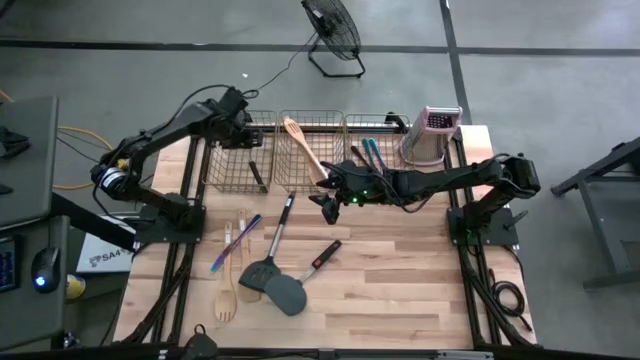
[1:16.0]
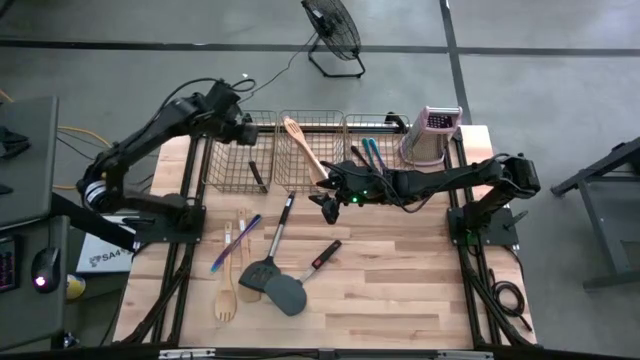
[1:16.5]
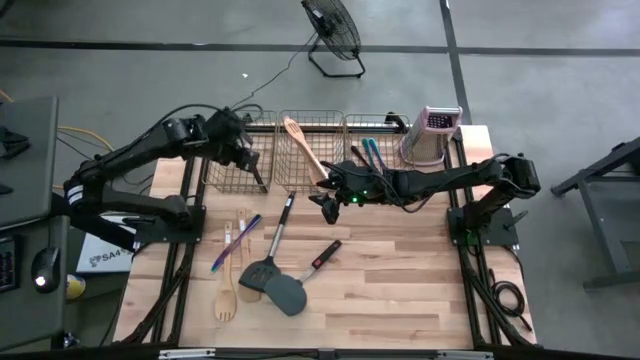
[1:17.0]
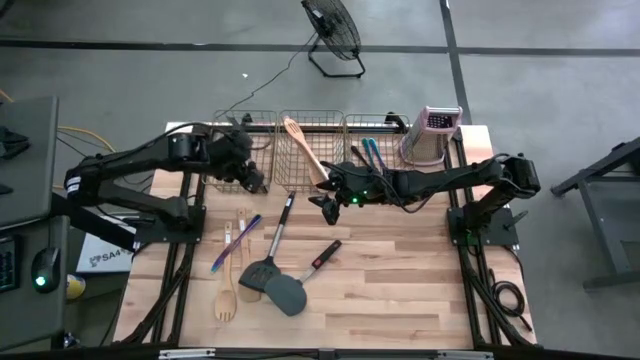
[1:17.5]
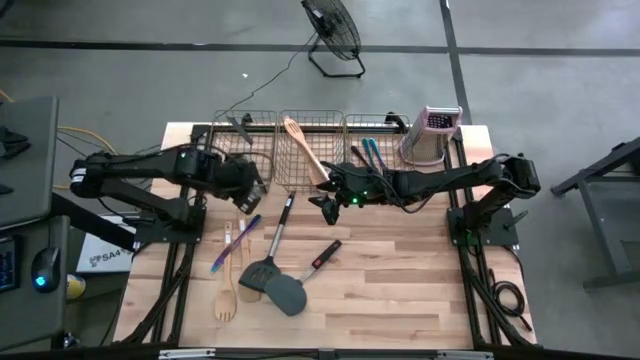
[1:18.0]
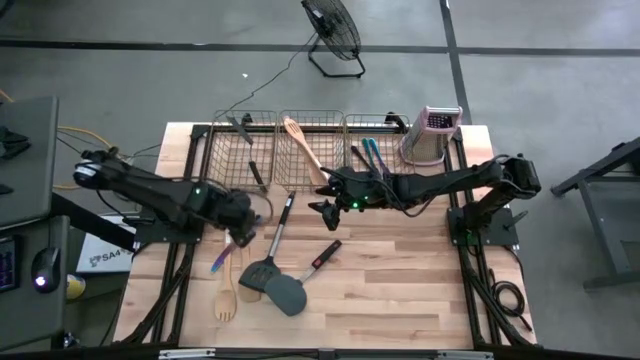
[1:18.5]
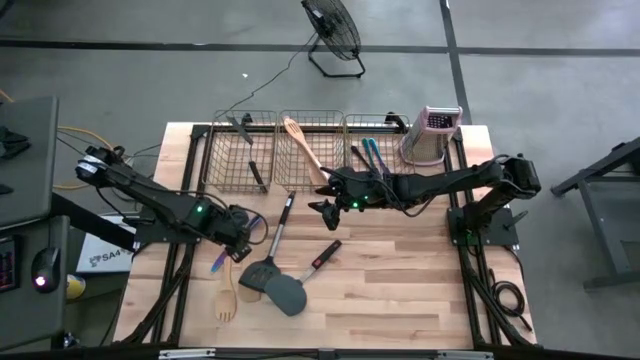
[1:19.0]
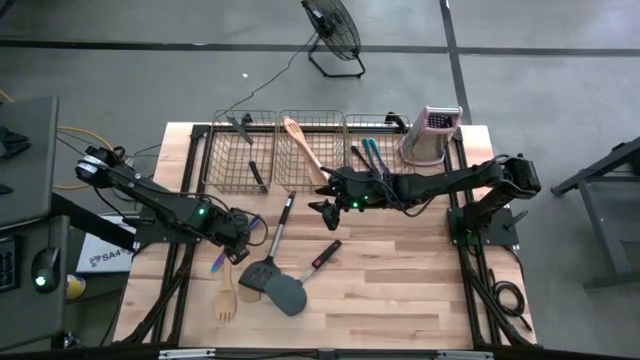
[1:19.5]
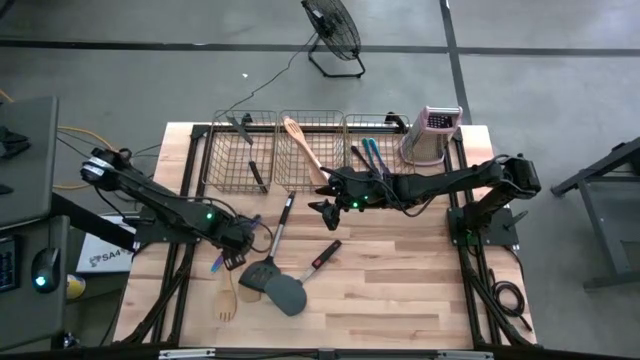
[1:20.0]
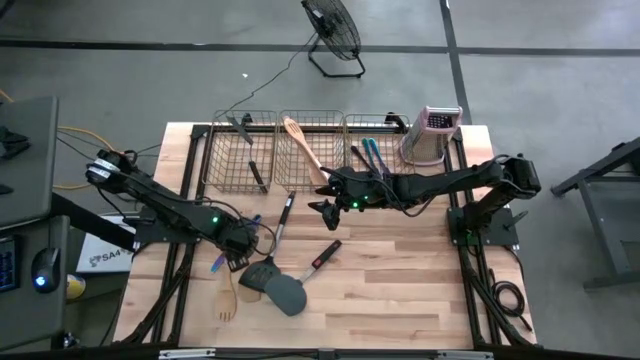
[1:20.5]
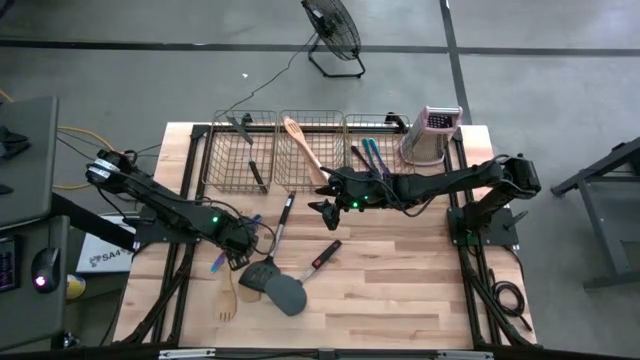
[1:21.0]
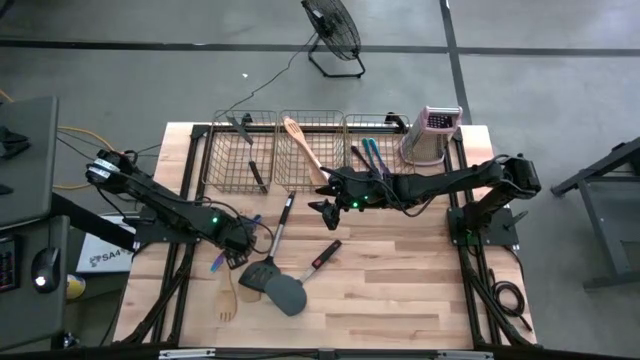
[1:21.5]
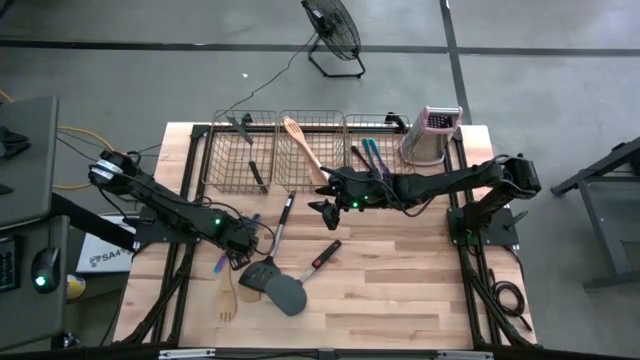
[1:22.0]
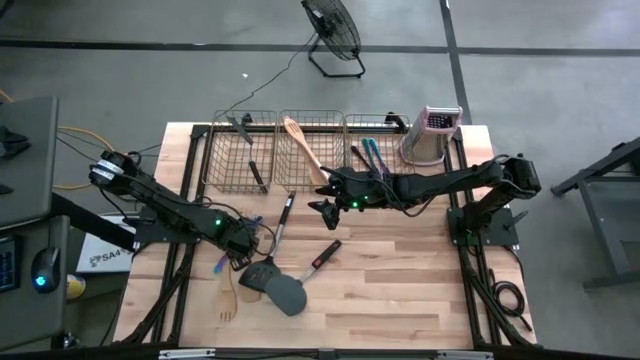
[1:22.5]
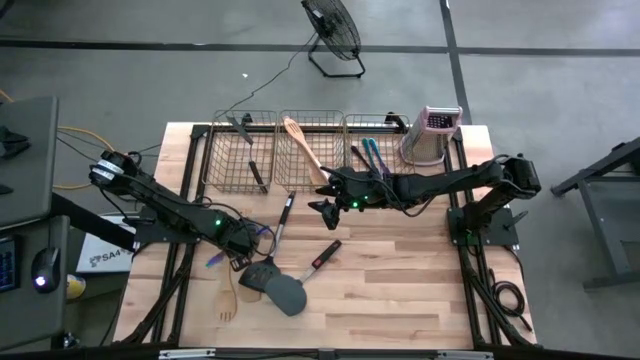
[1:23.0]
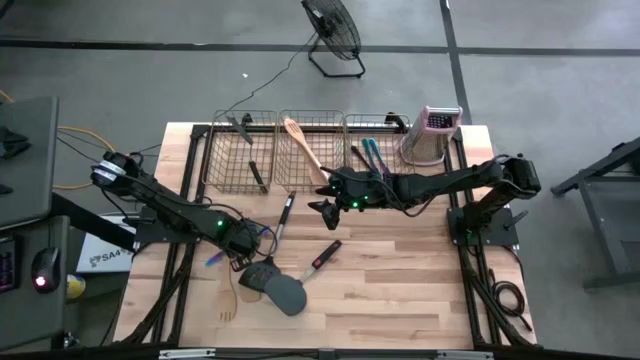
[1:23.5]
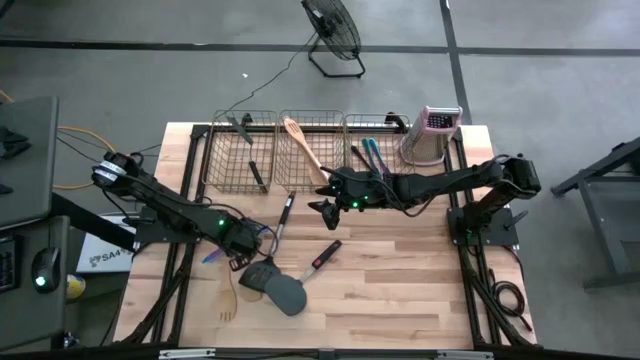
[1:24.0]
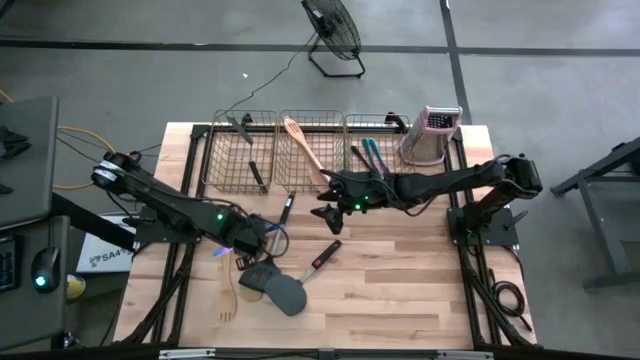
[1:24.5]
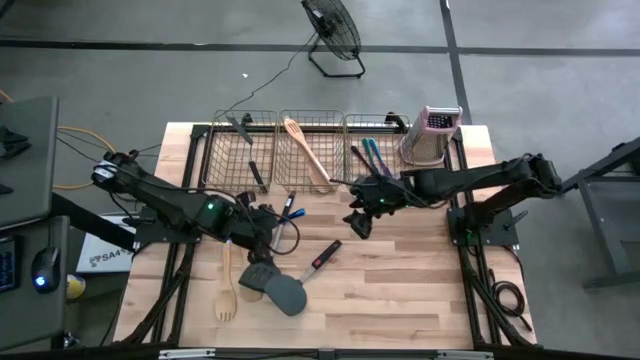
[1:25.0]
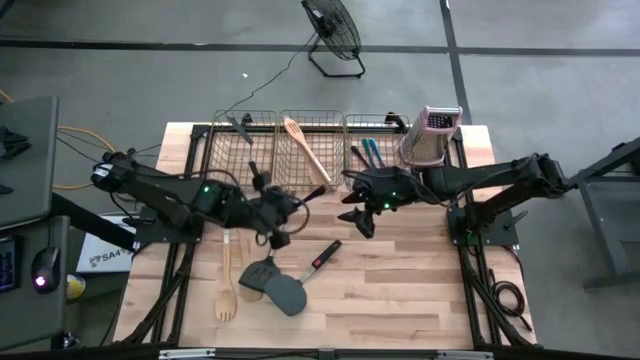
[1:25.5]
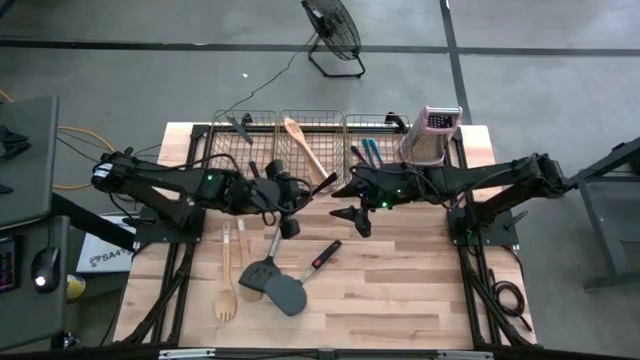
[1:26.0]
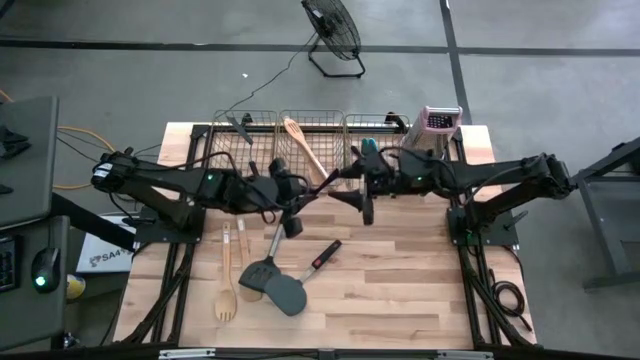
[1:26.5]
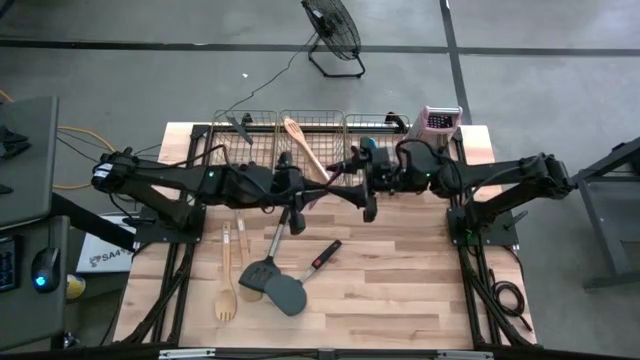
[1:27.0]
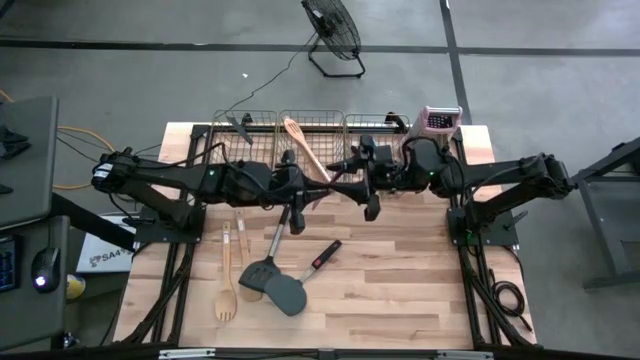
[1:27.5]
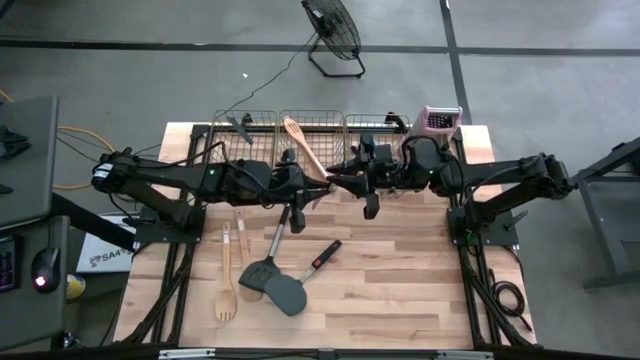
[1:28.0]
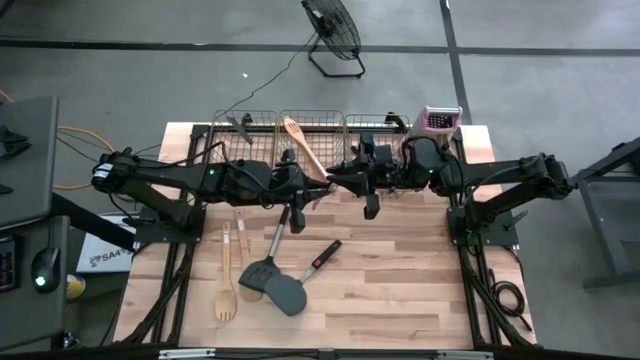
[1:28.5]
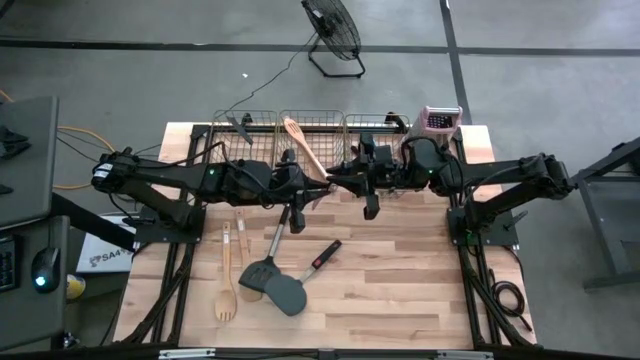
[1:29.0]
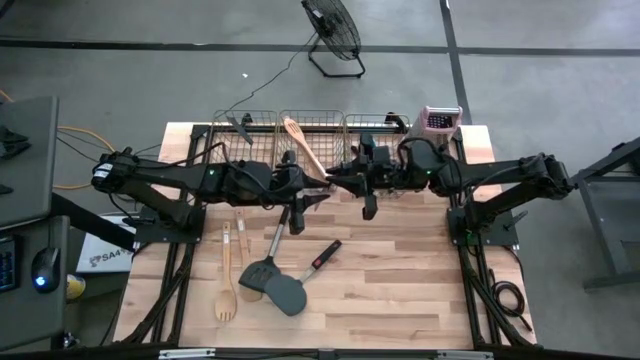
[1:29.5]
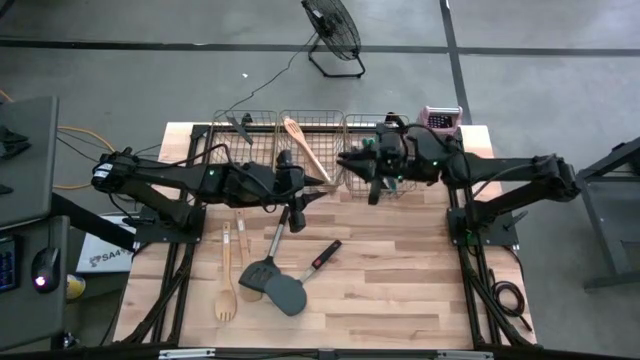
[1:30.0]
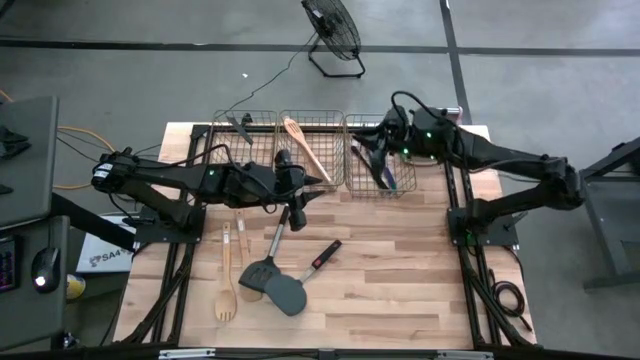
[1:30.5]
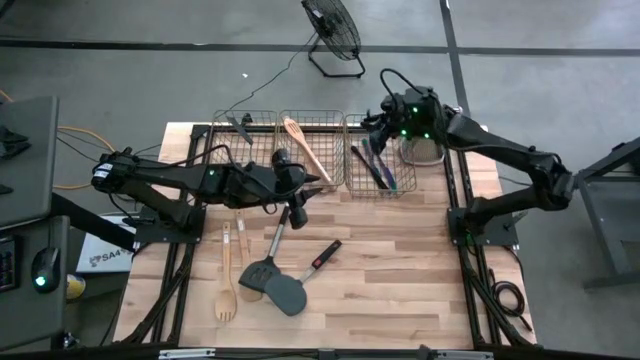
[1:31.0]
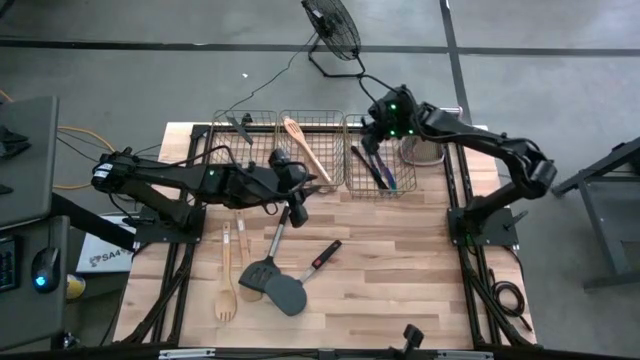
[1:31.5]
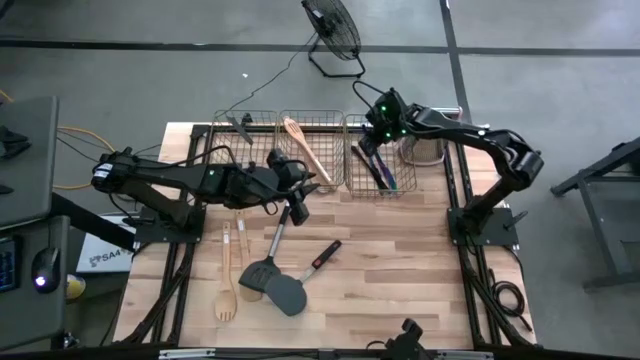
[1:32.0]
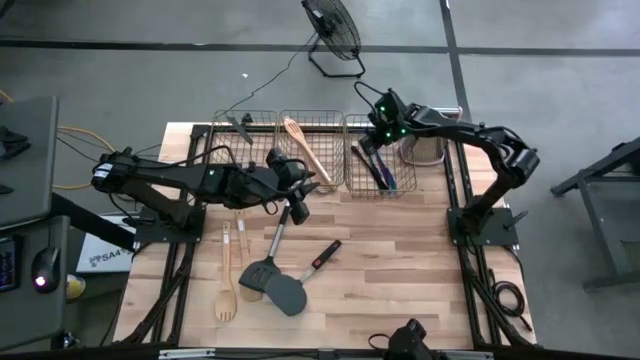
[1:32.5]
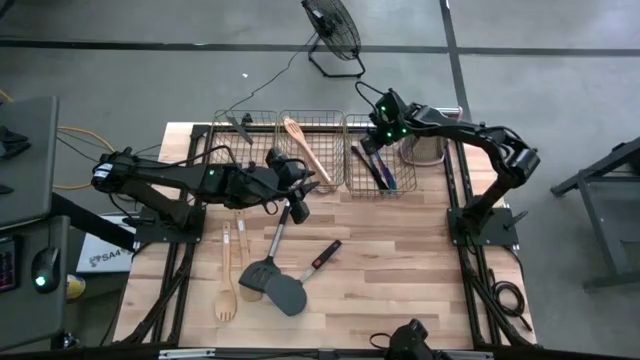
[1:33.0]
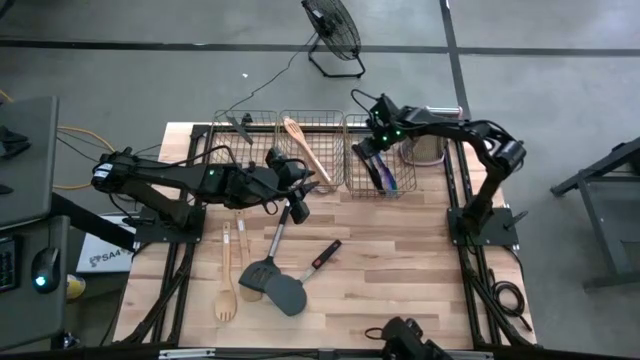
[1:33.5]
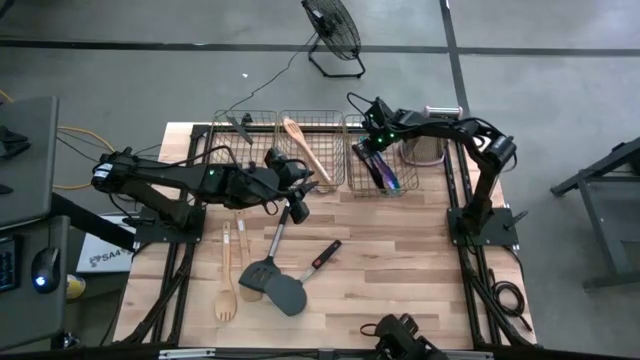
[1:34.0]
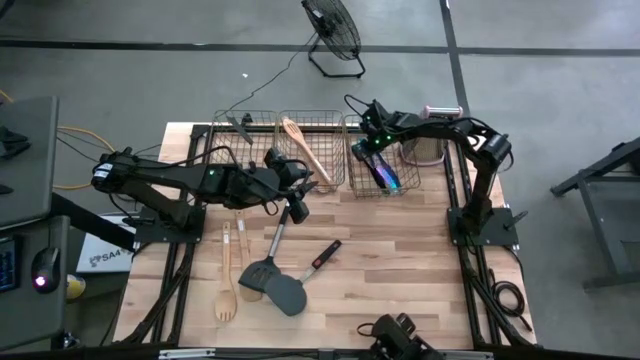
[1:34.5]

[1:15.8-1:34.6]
Task: Pick & Place Kitchen Items
Put the blue knife into the right wire basket

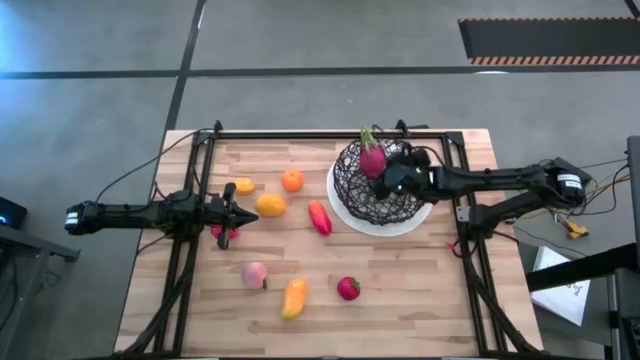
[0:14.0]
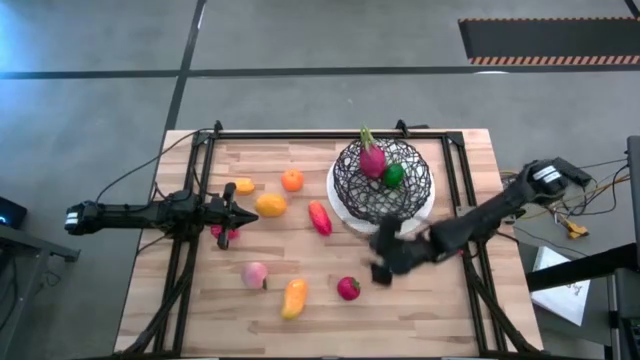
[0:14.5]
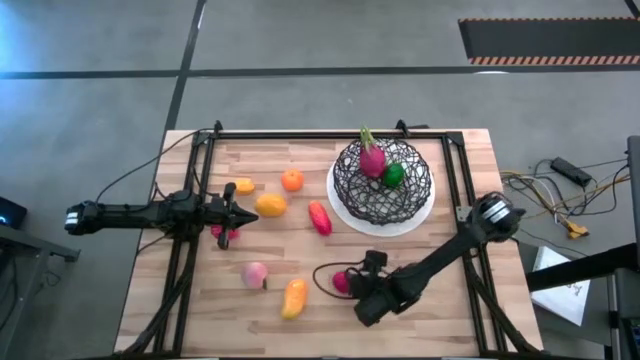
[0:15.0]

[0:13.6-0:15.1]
Task: Build produce basket
Put the tomato into the black basket

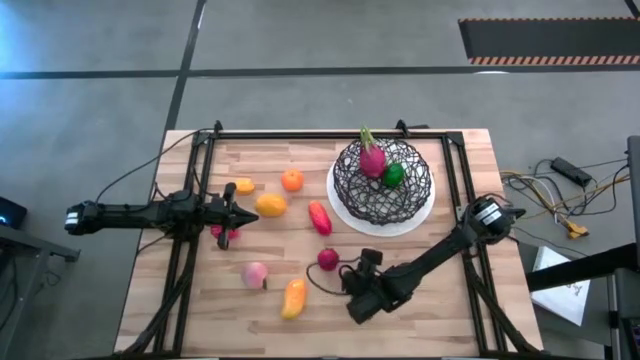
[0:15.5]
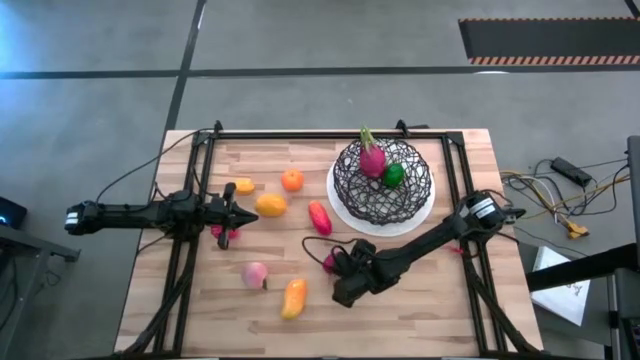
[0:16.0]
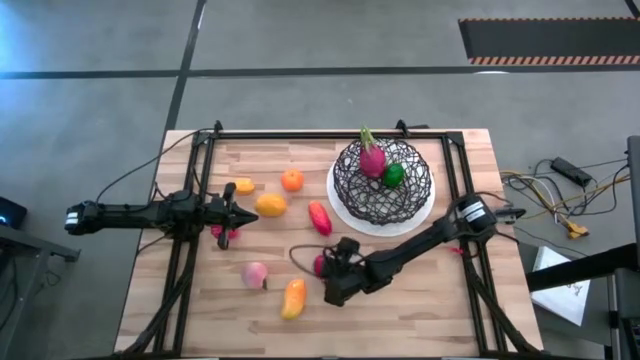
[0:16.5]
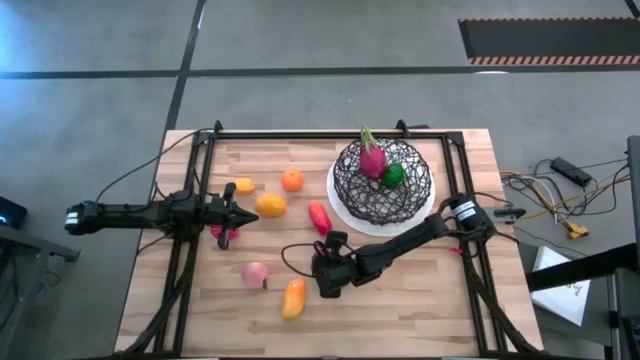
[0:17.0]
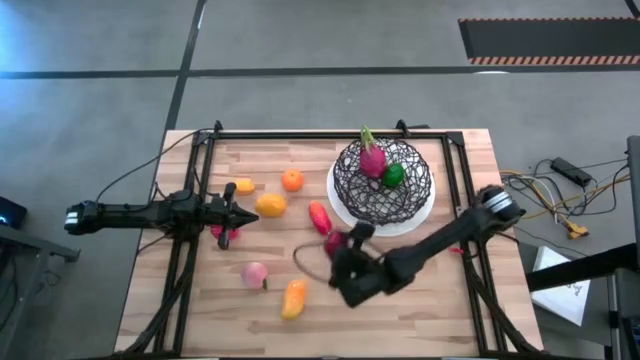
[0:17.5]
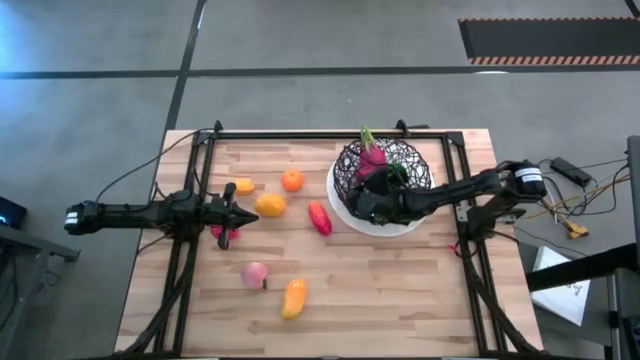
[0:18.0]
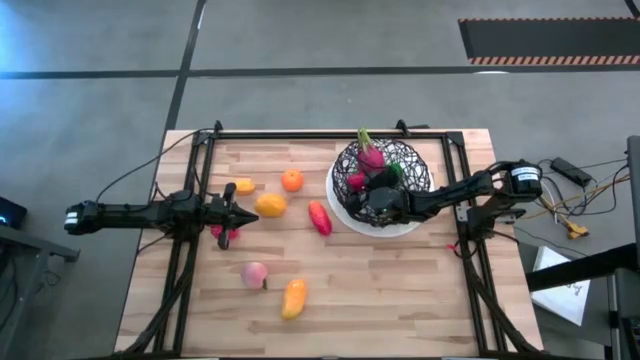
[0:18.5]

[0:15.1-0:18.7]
Put the tomato into the black basket
